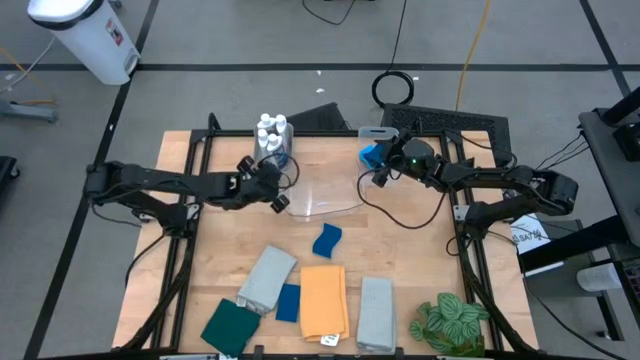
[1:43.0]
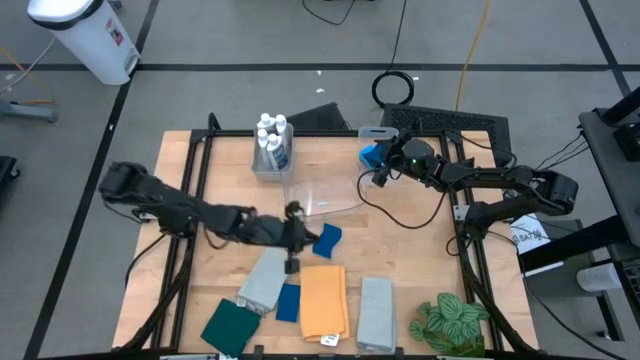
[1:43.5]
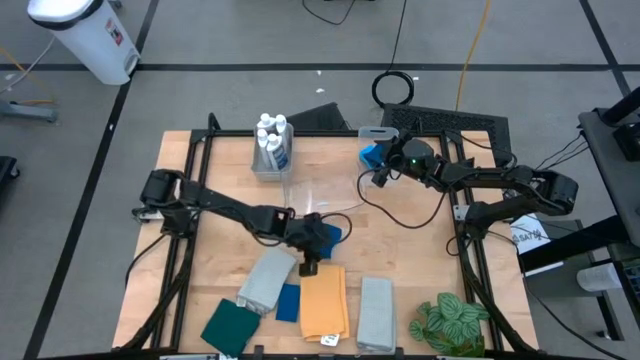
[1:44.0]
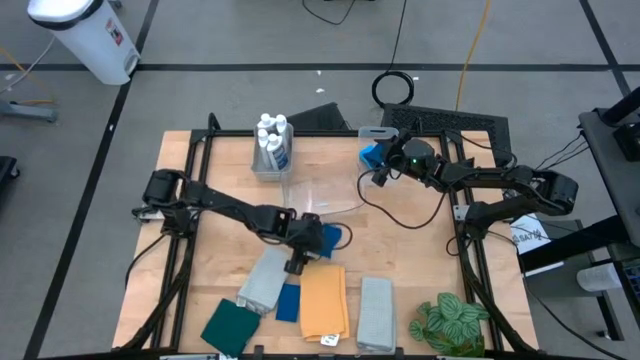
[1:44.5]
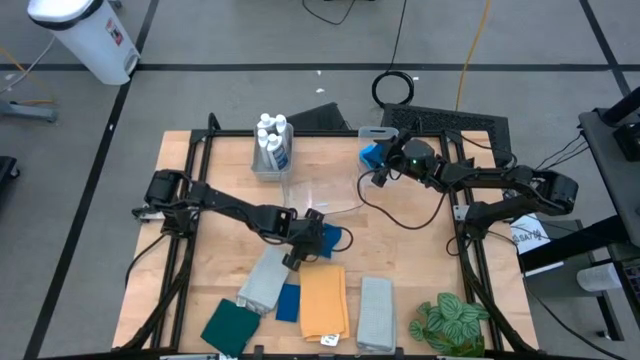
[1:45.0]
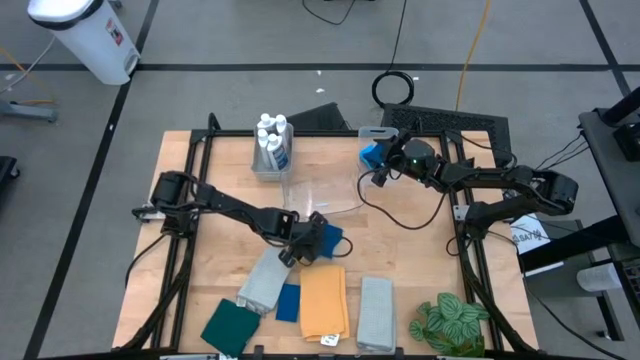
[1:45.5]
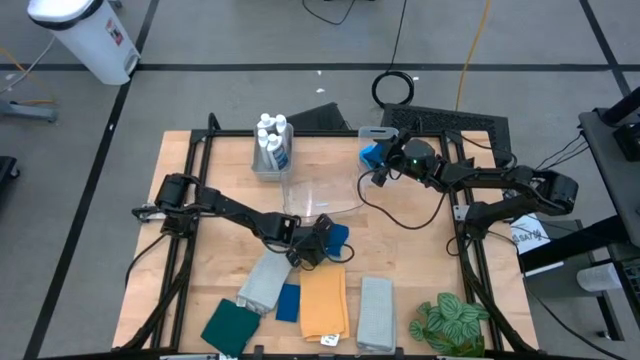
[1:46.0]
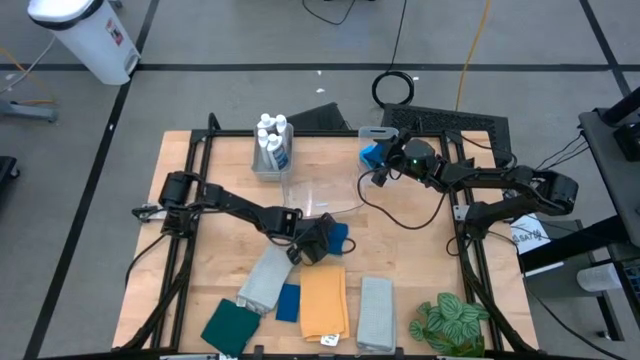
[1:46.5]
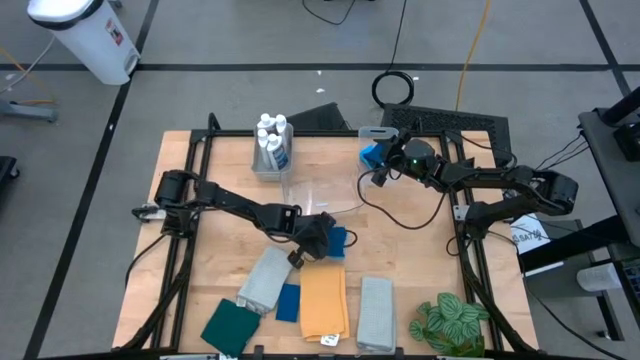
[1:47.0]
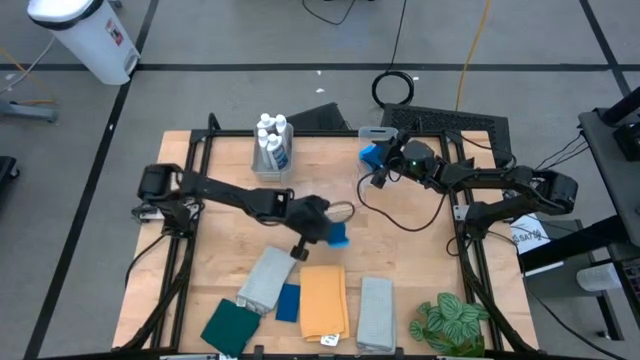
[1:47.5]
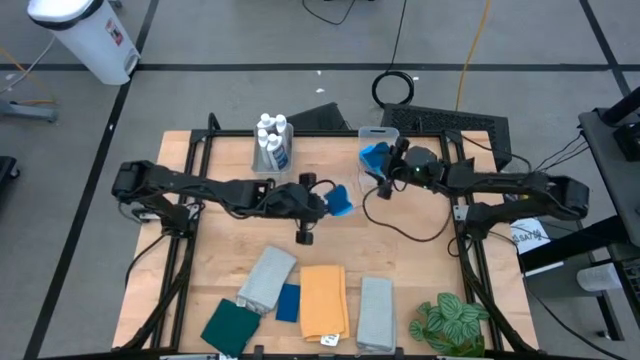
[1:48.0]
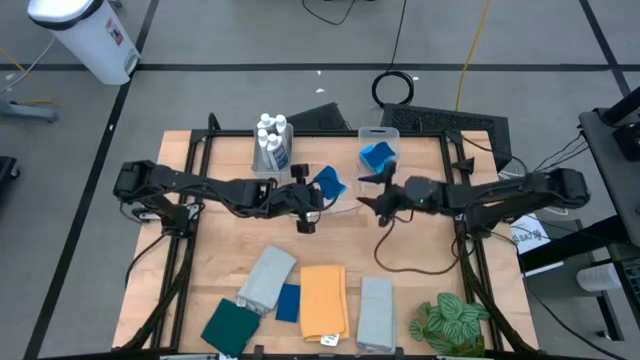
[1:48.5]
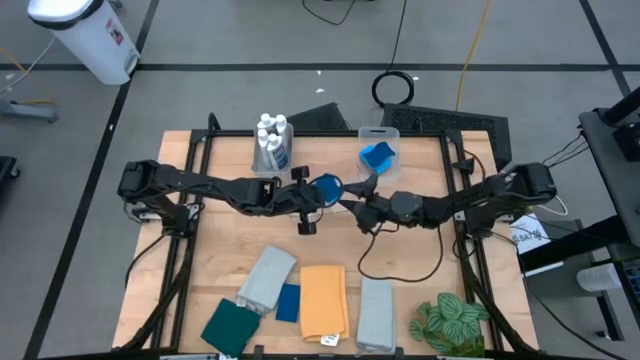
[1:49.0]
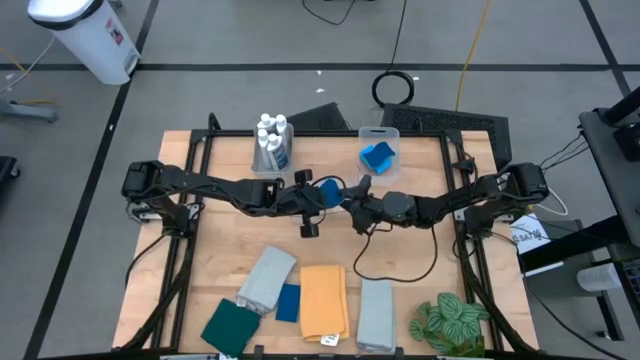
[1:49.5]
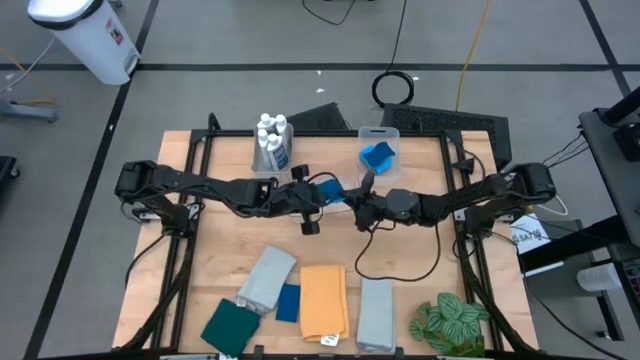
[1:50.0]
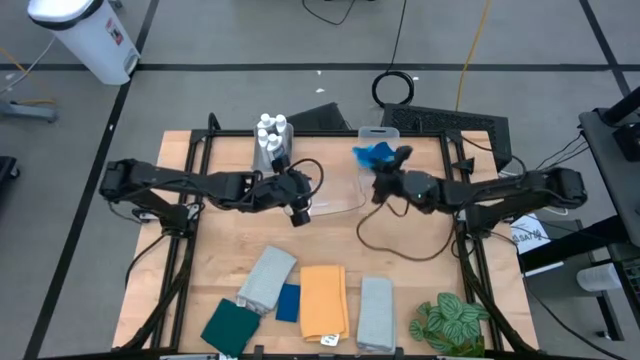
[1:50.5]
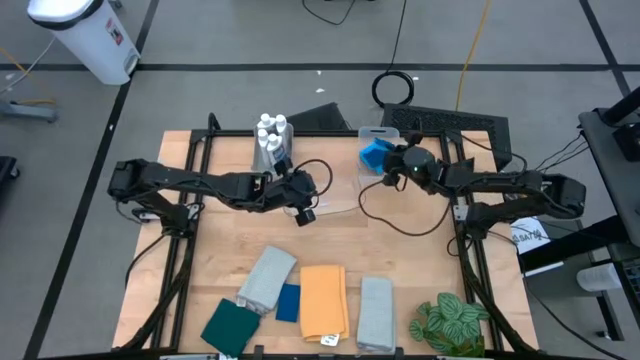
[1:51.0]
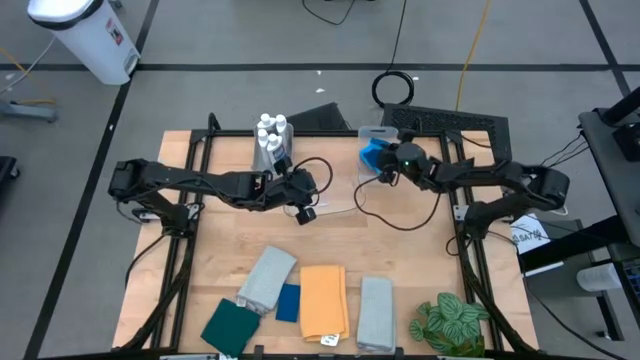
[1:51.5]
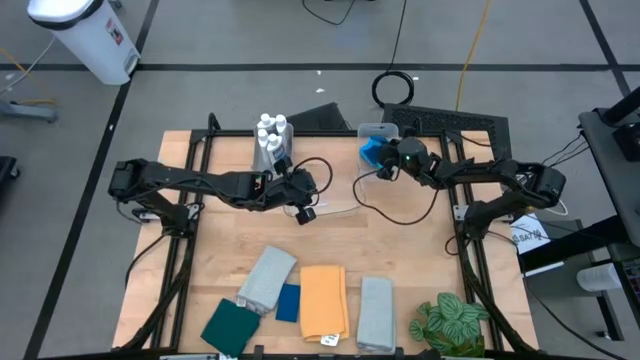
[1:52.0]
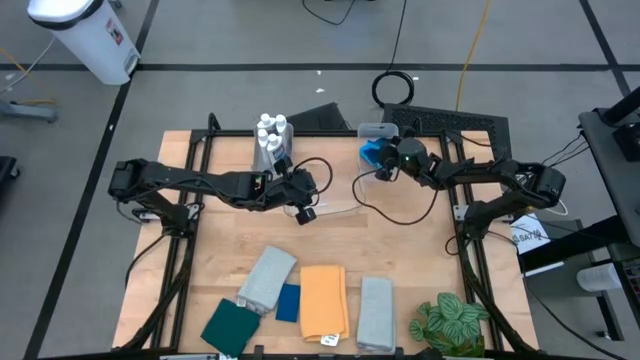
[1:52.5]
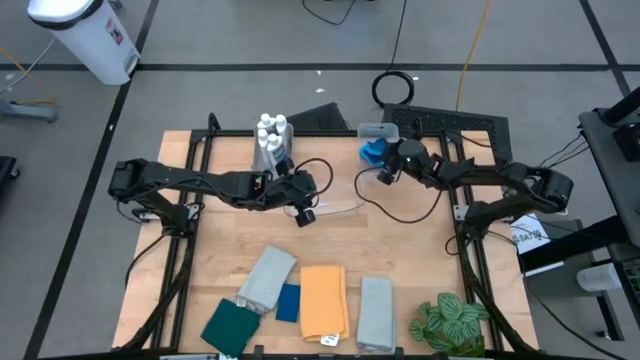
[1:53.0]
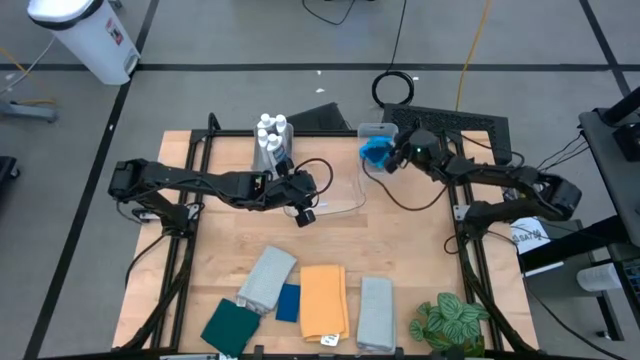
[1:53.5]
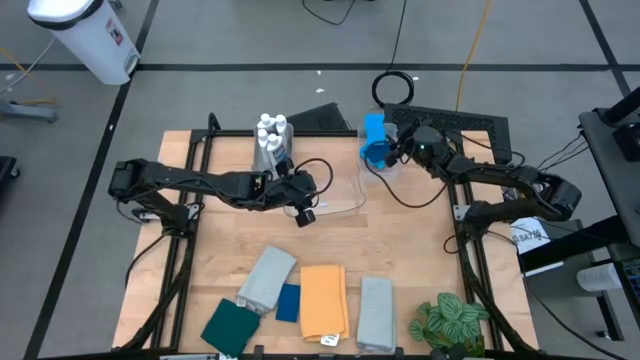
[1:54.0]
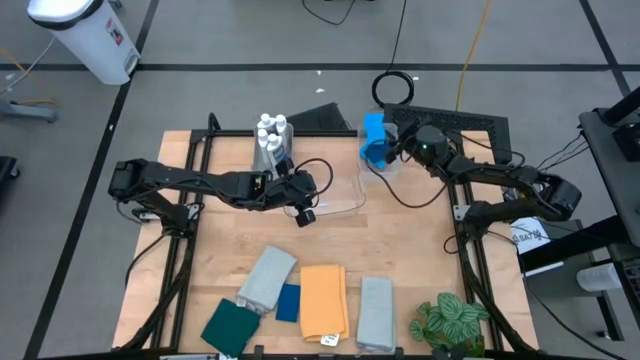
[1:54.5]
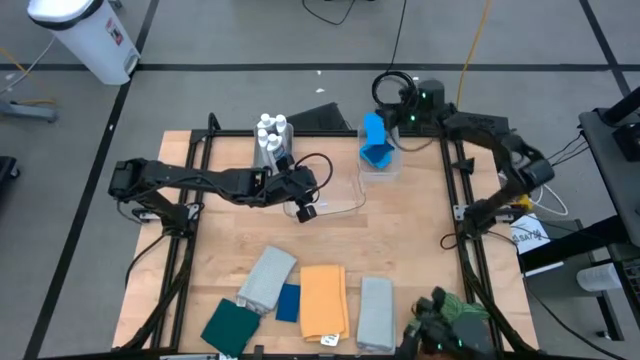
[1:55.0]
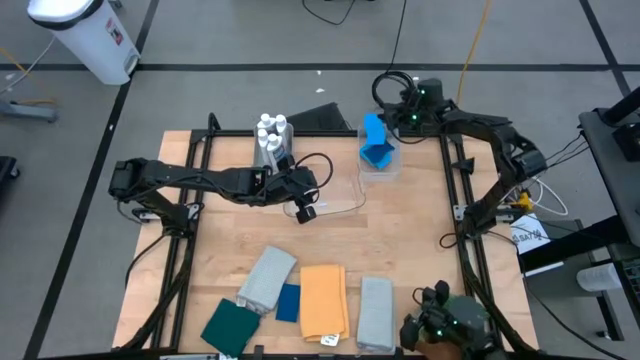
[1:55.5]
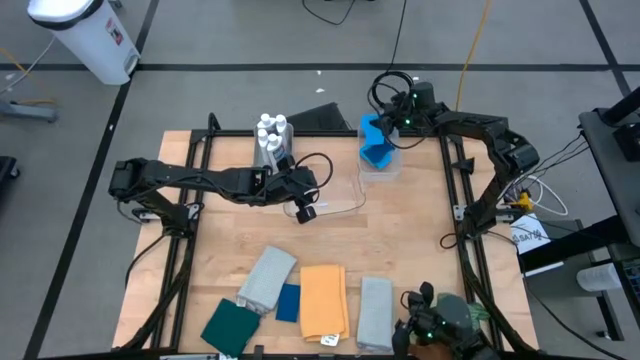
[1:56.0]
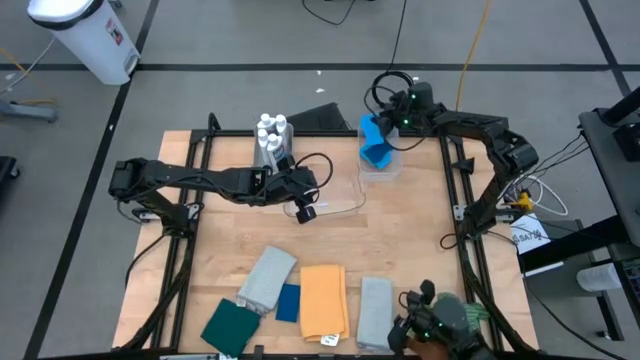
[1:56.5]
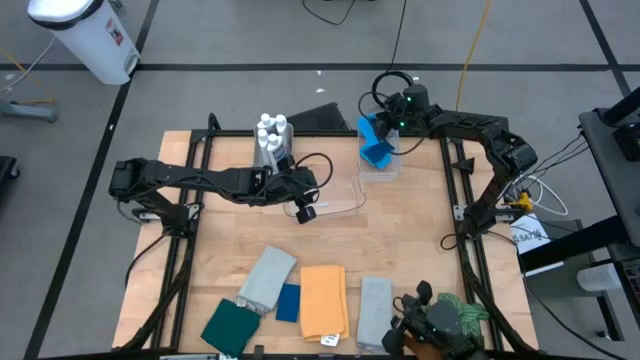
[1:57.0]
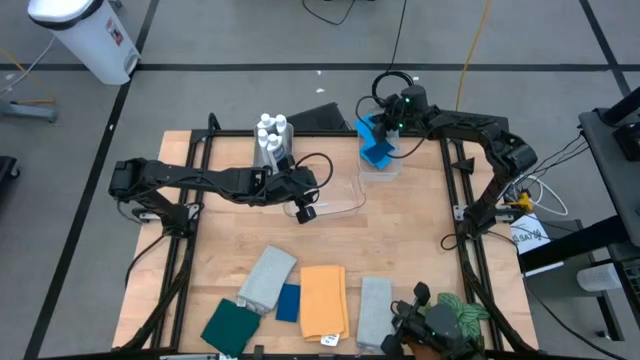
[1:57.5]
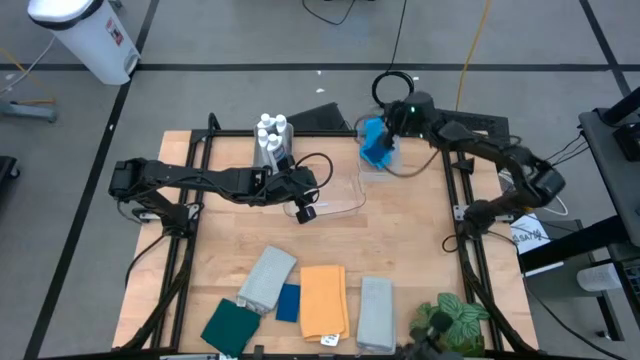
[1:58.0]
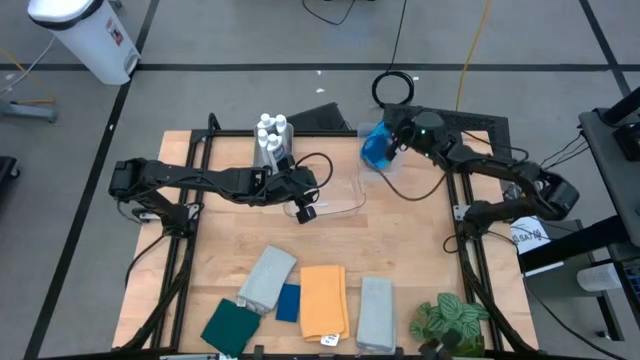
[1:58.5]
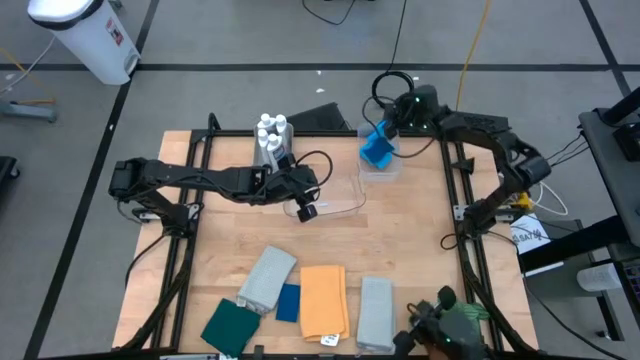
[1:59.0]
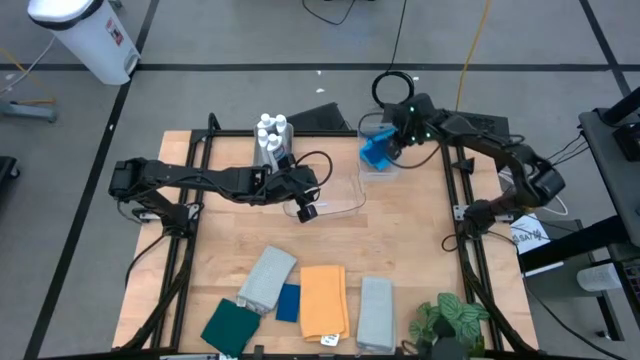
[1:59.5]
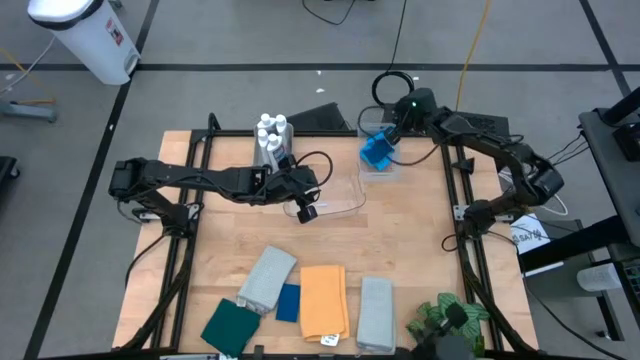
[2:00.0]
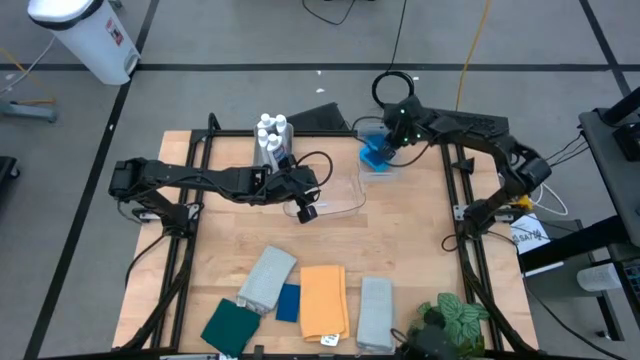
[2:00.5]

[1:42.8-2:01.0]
Task: Pick & Place Kitchen Items
Put the blue sponge into the white bin

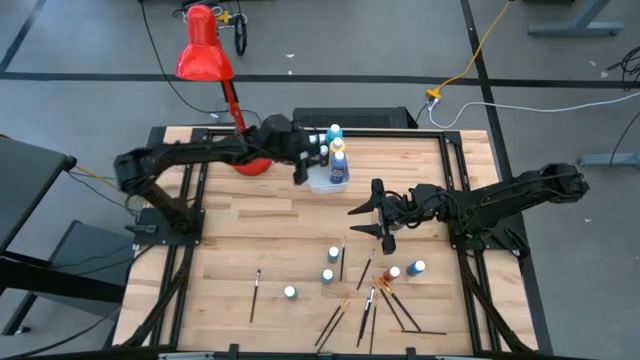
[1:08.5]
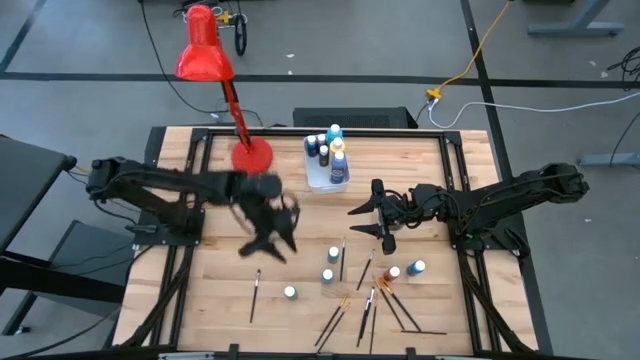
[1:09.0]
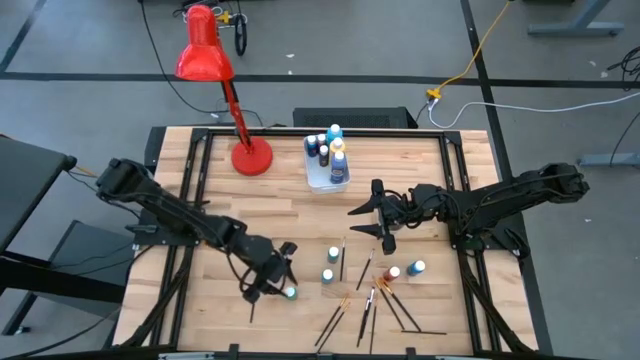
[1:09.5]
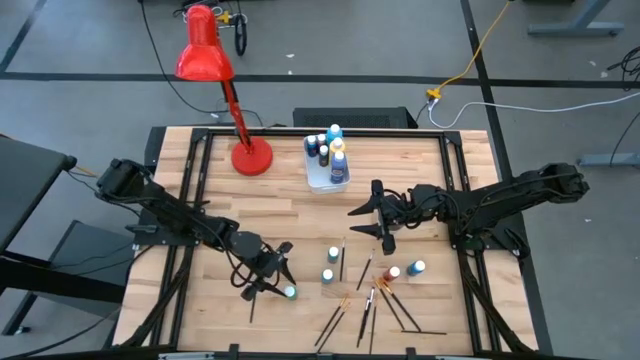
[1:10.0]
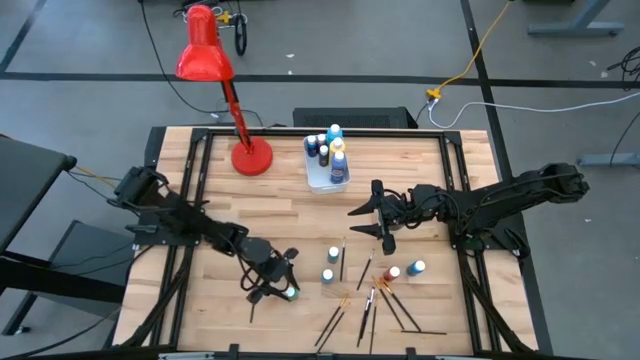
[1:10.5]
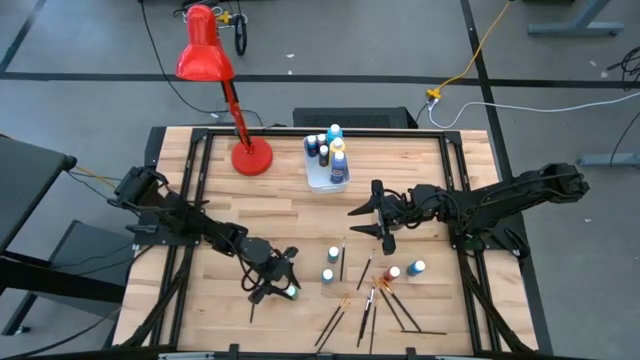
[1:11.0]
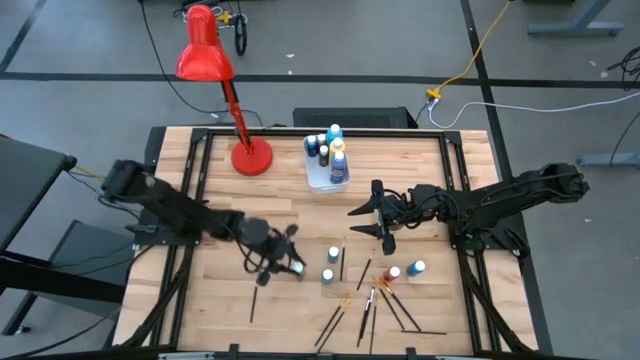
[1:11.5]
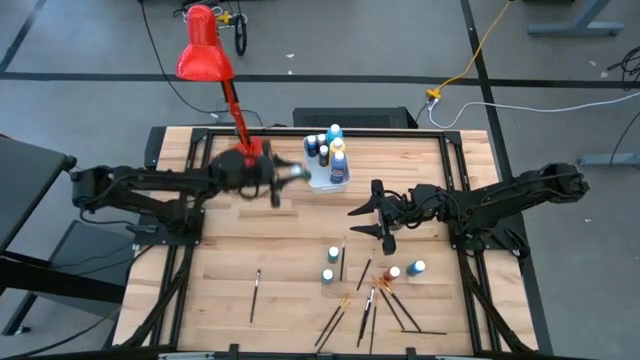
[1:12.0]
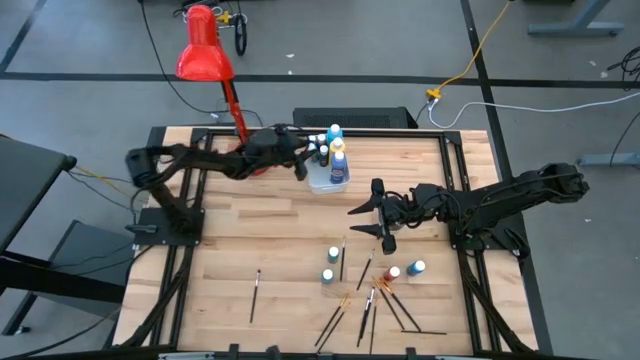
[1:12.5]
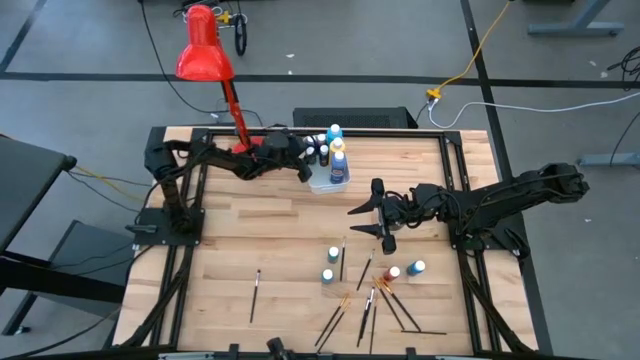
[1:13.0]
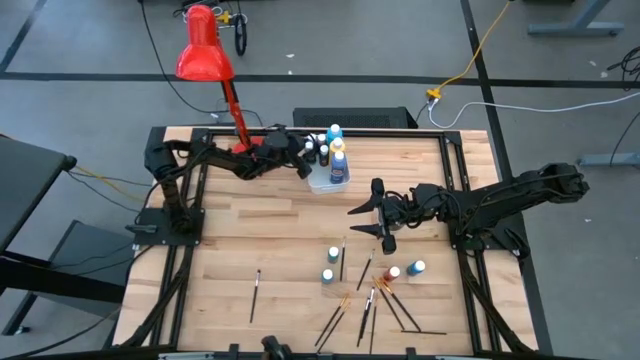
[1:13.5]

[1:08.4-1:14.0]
Task: Pick & Place Paint Supplies
Put the small green paint bottle into the white bin
